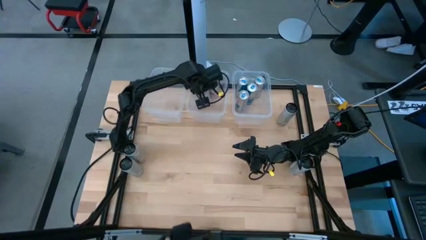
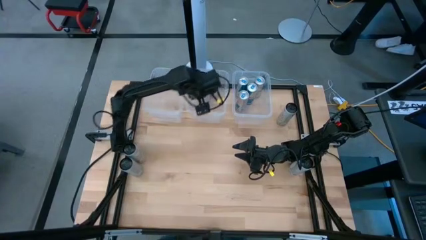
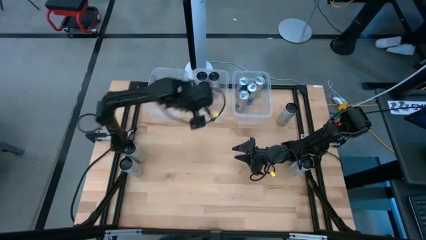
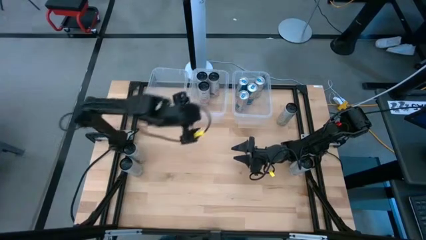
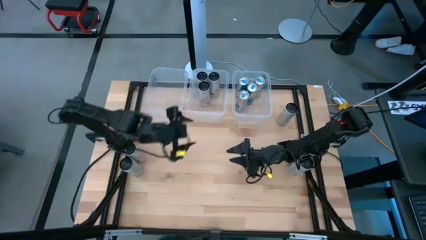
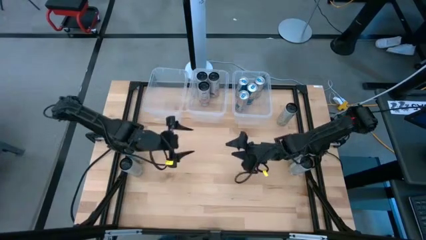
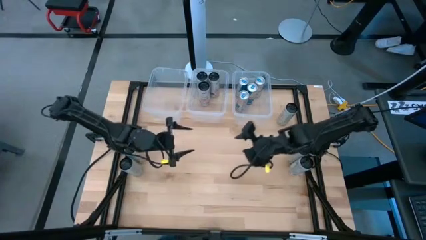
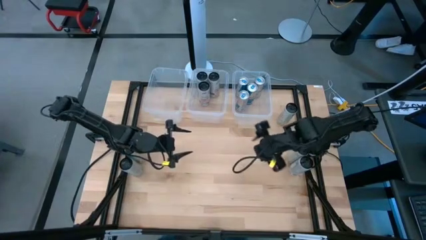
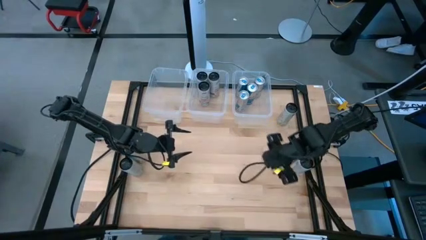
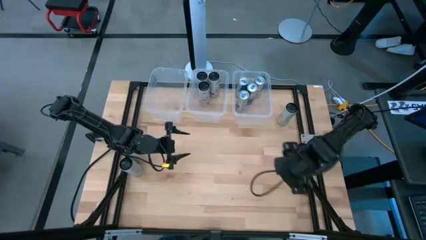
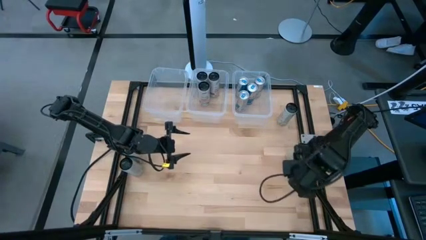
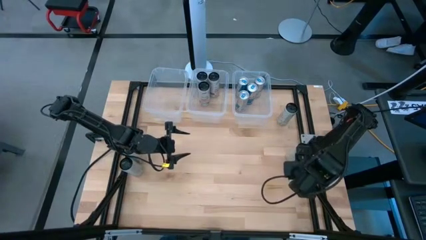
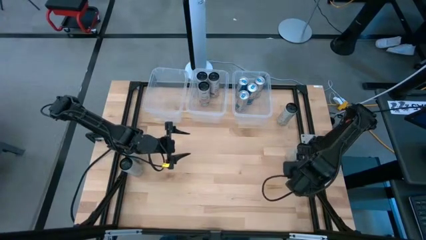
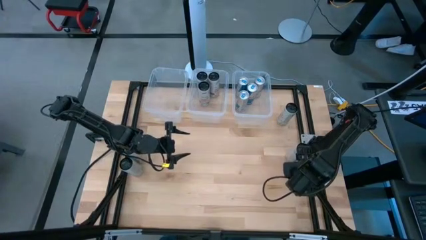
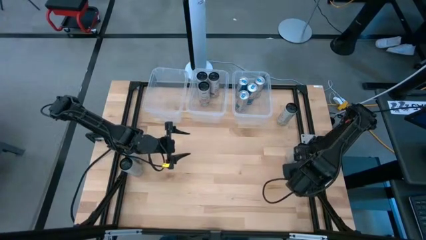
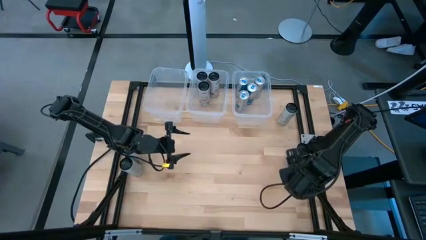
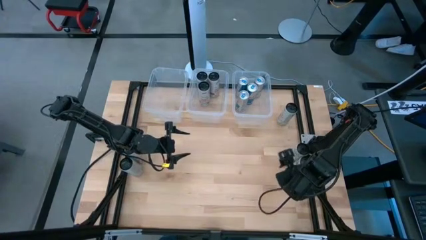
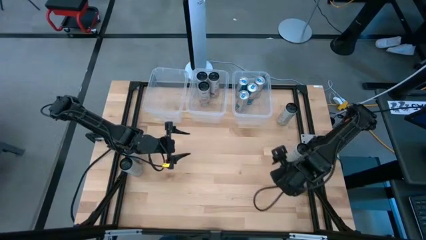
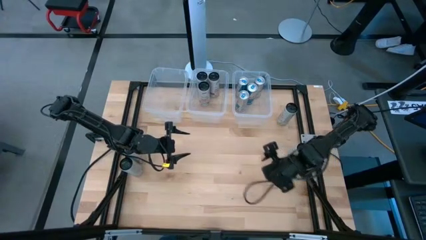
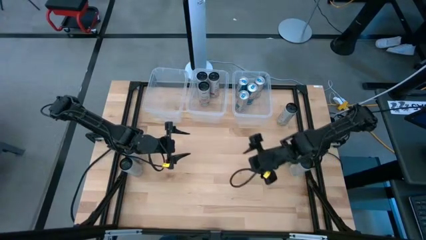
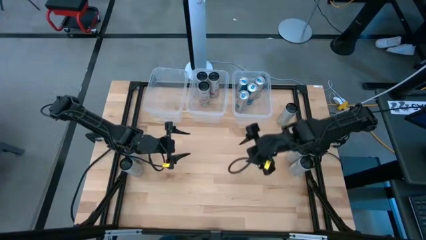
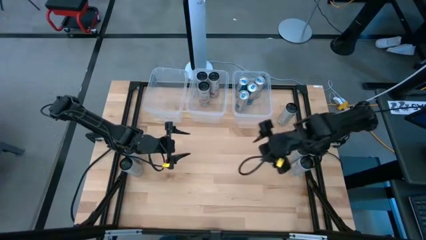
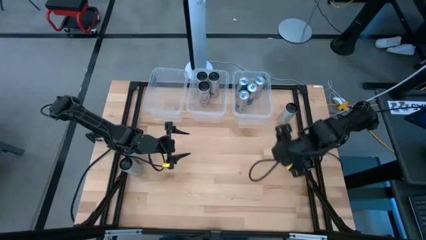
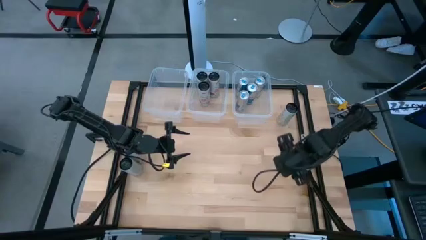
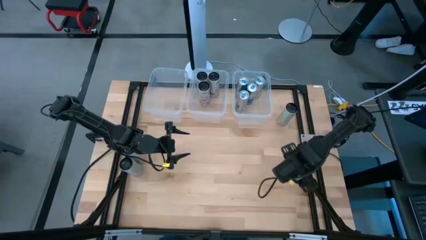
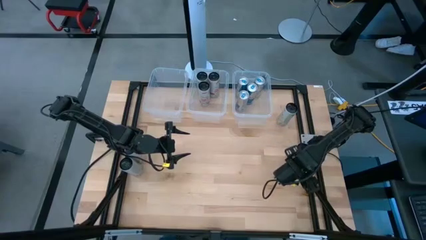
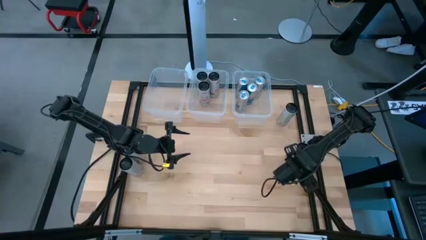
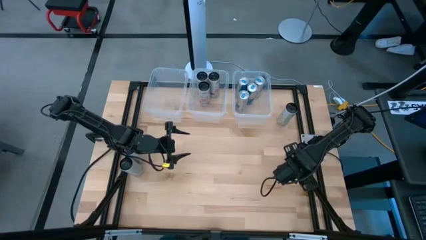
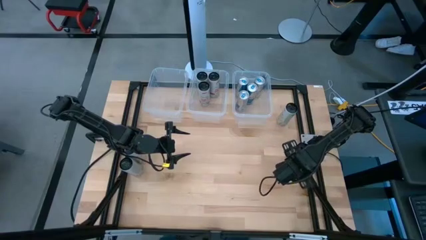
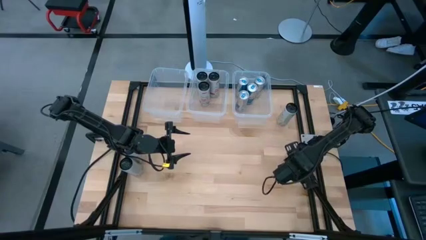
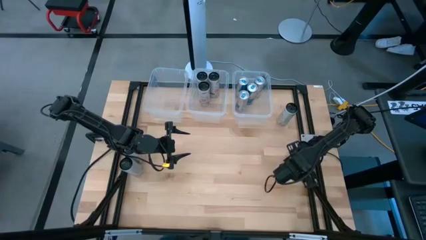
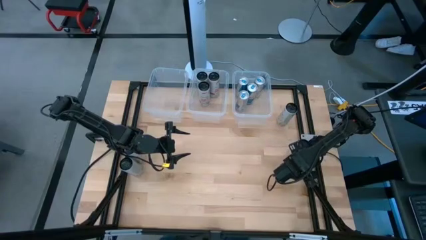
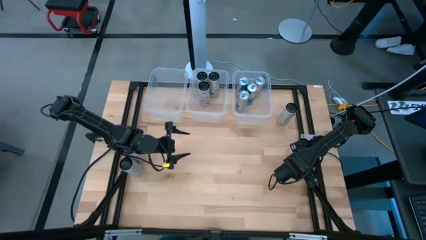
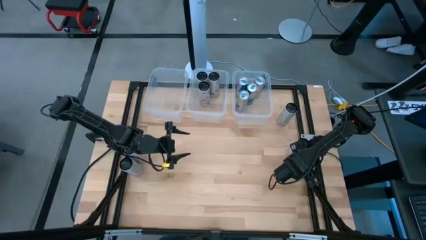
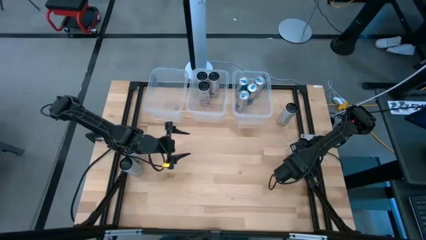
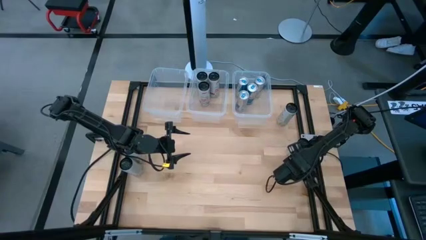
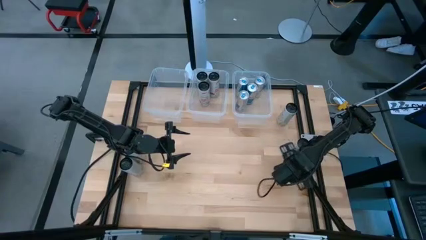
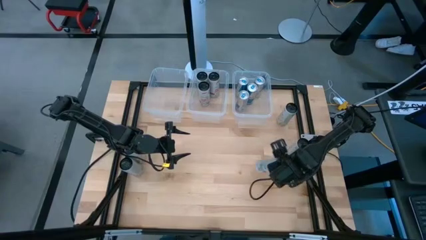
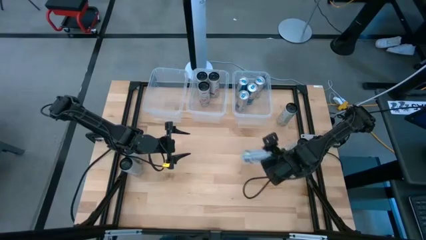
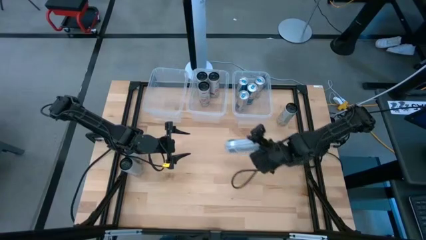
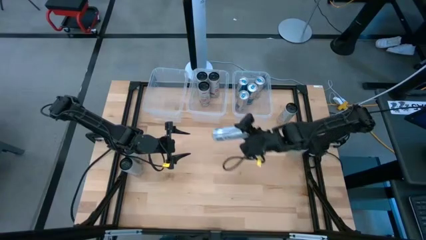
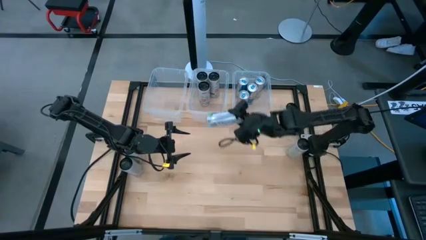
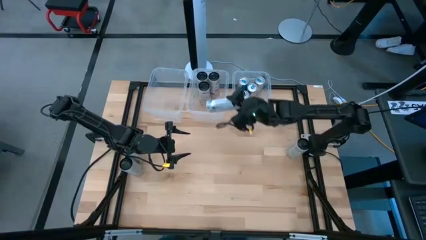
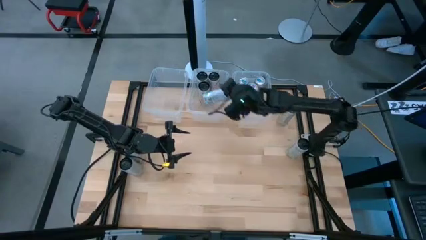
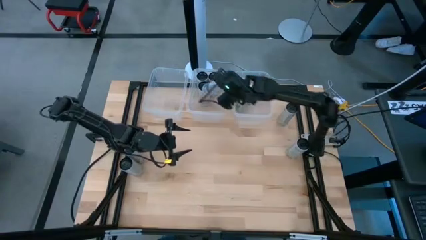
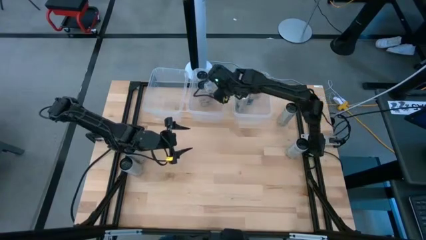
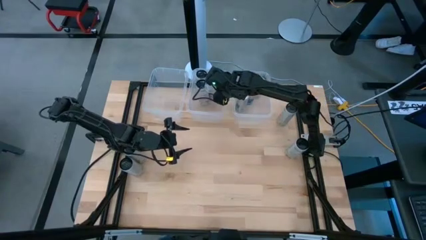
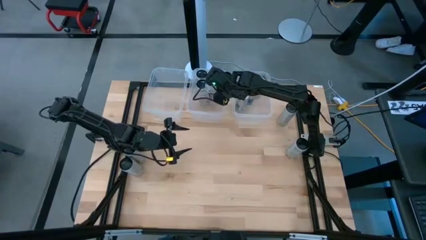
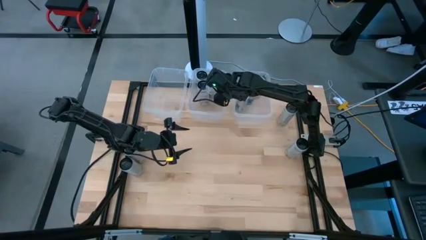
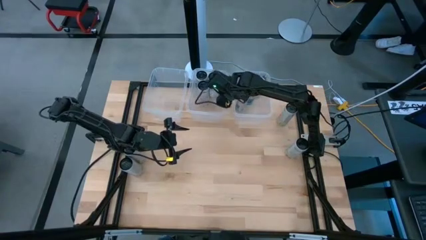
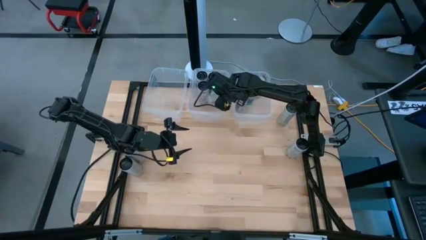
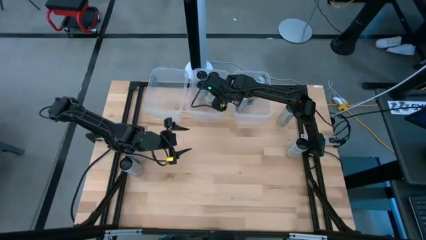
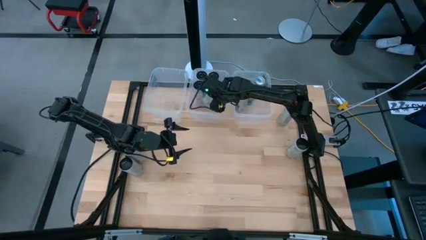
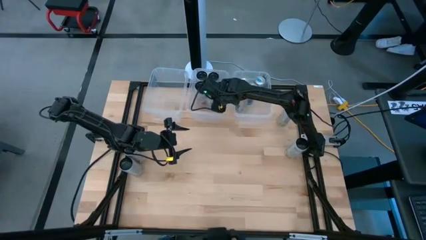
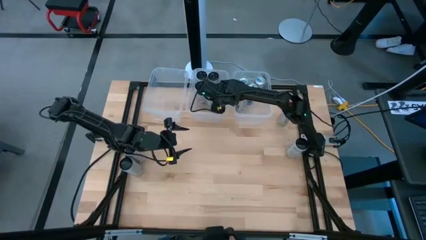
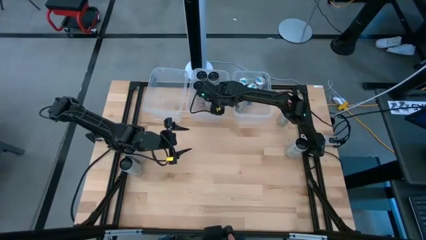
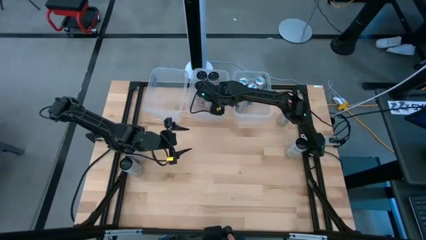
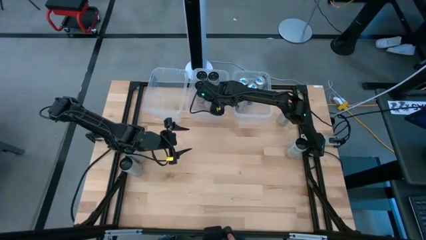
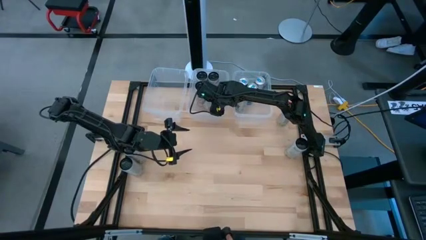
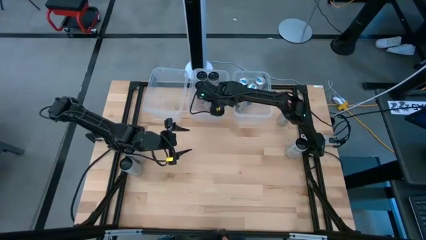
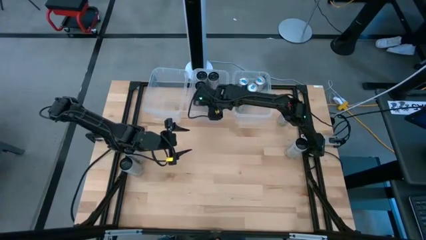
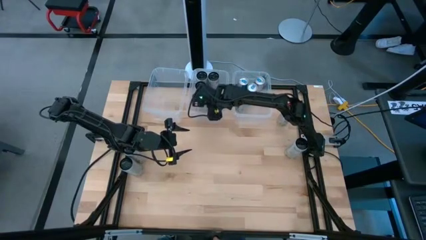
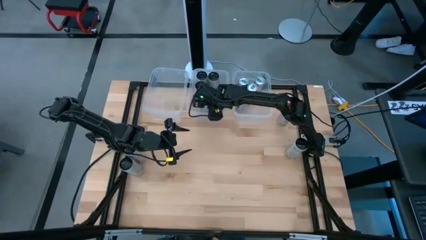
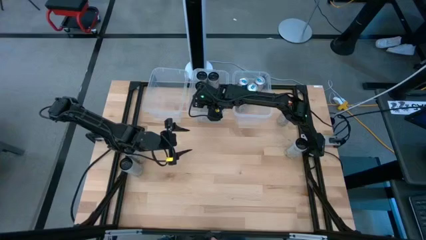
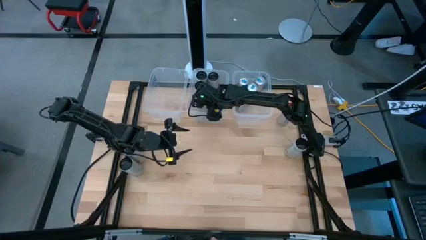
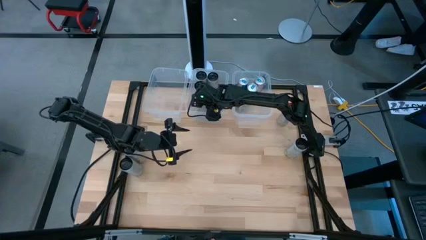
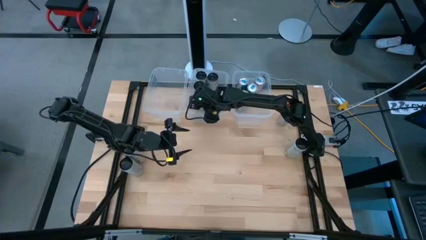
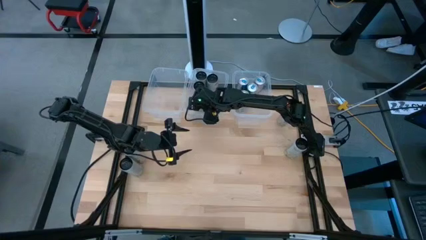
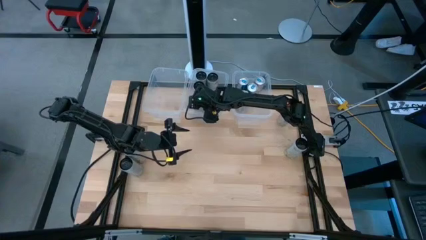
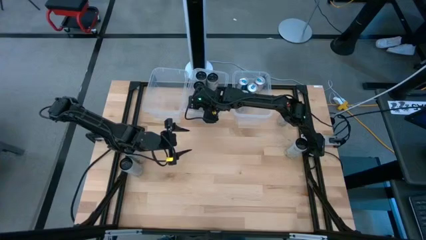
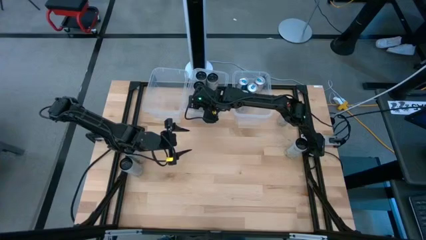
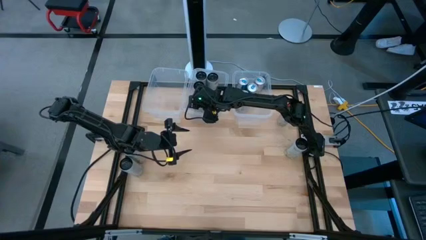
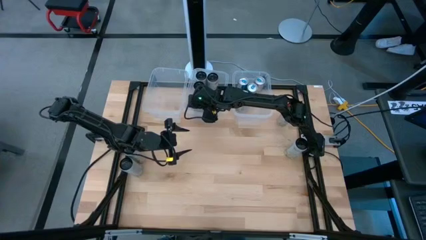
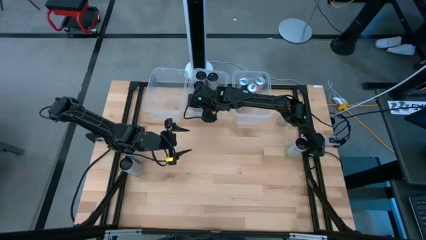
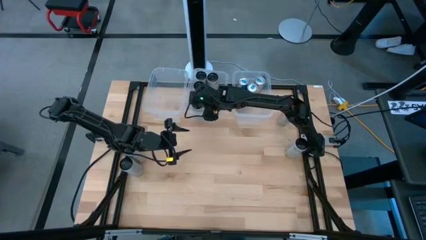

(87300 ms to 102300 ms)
Task: Sort soda cans
Put the white-pink soda can into the middle transparent bin
